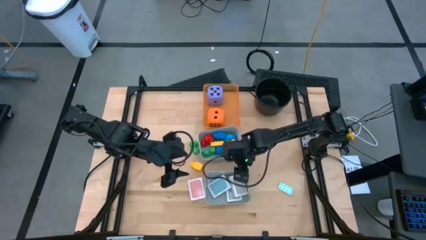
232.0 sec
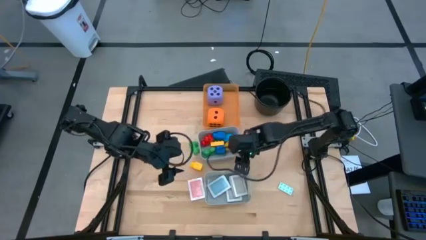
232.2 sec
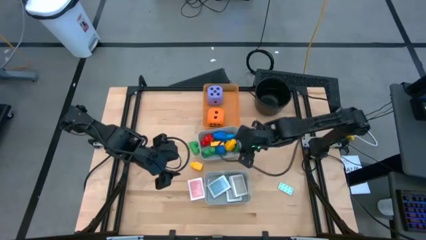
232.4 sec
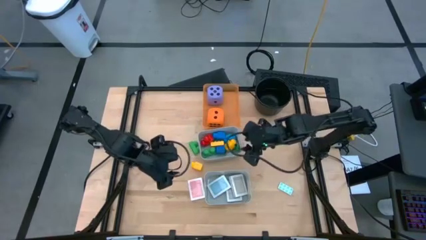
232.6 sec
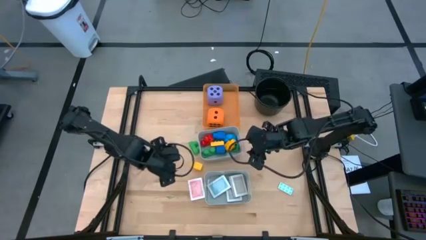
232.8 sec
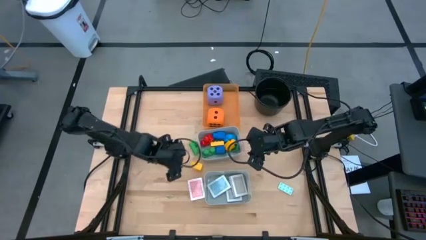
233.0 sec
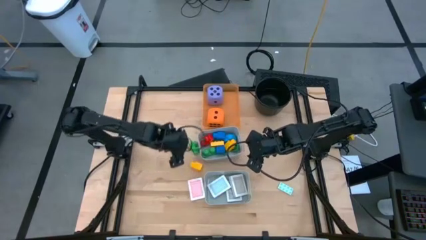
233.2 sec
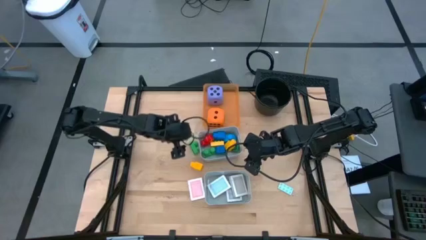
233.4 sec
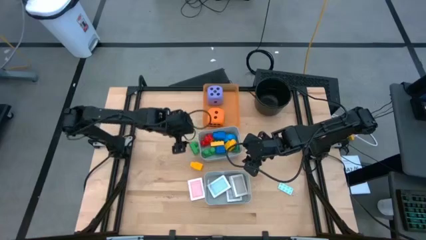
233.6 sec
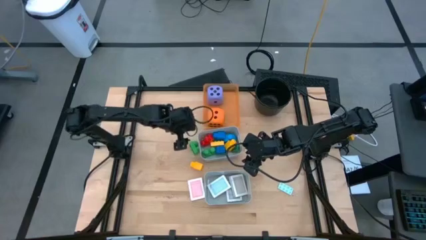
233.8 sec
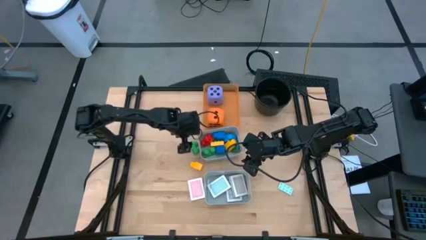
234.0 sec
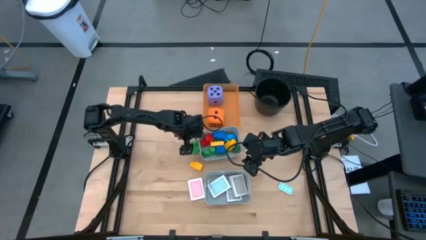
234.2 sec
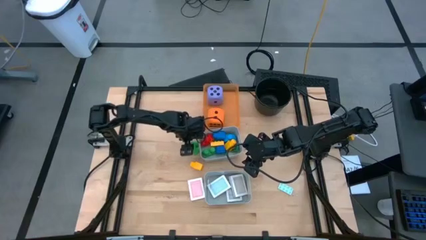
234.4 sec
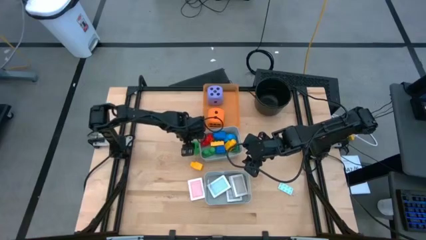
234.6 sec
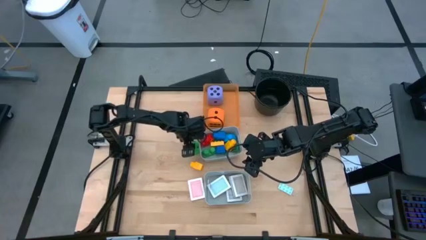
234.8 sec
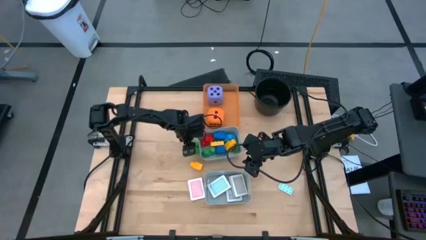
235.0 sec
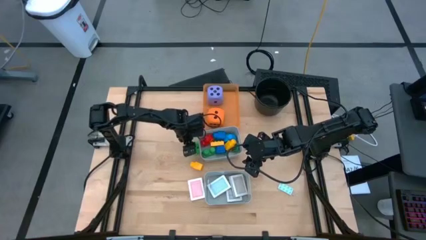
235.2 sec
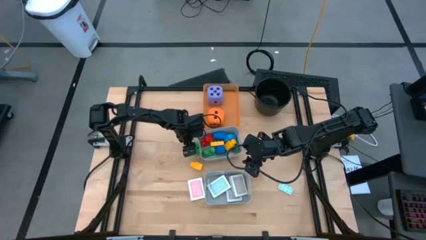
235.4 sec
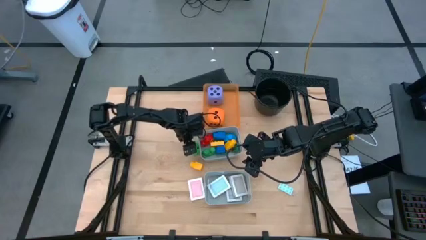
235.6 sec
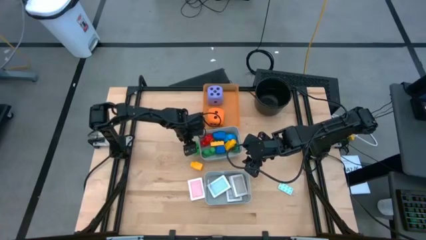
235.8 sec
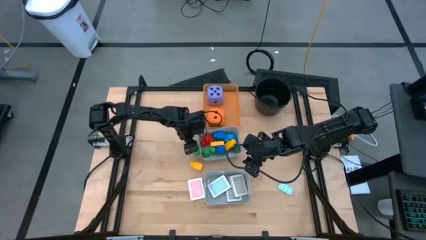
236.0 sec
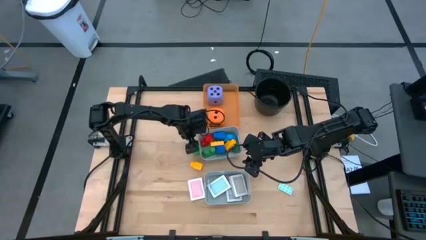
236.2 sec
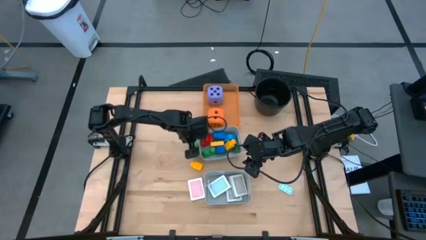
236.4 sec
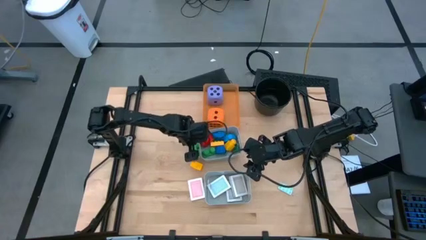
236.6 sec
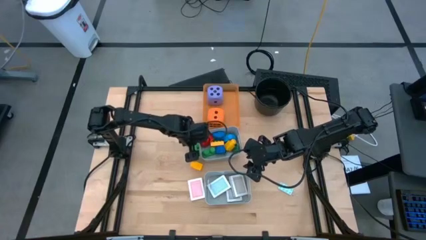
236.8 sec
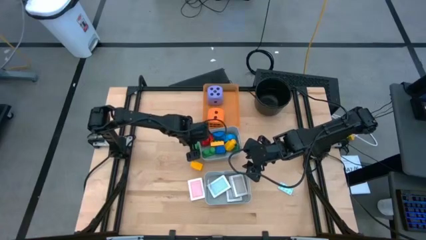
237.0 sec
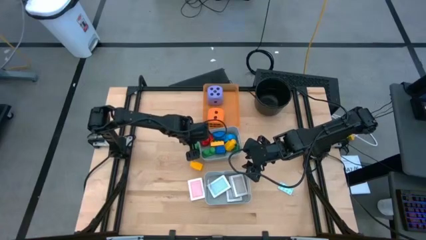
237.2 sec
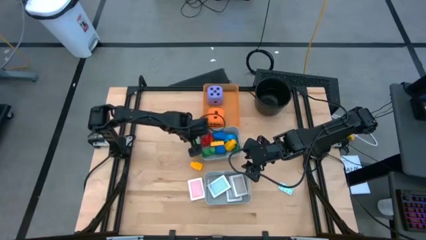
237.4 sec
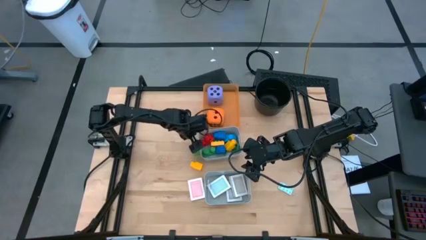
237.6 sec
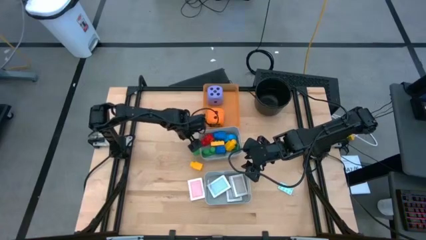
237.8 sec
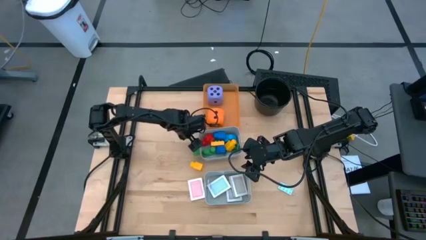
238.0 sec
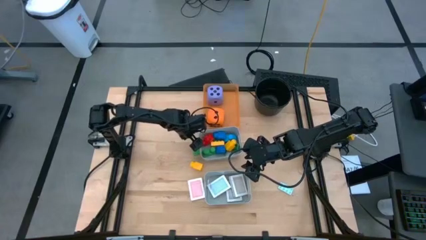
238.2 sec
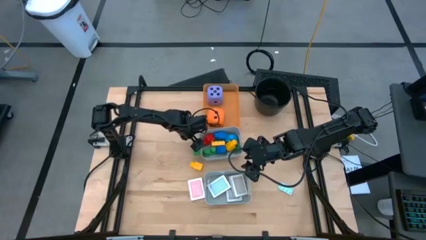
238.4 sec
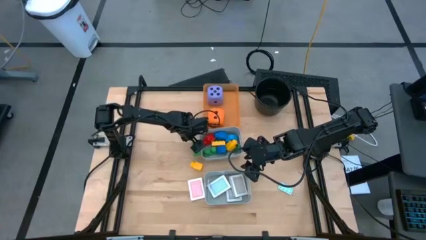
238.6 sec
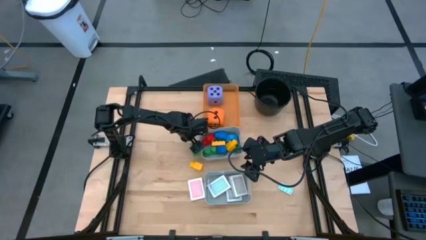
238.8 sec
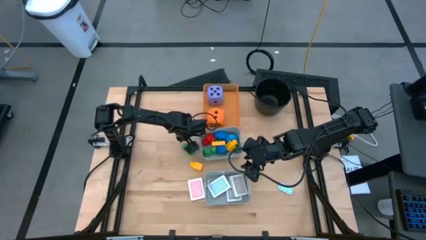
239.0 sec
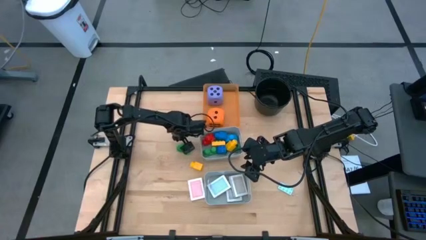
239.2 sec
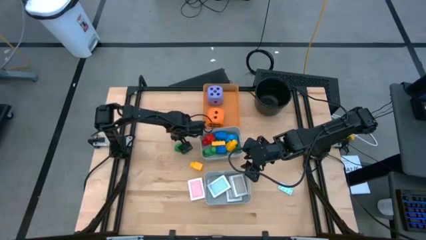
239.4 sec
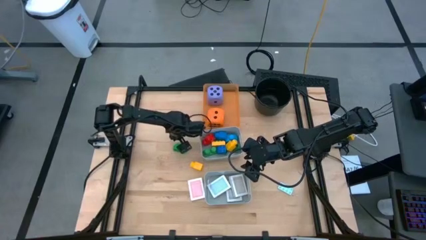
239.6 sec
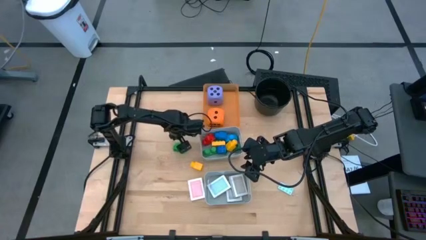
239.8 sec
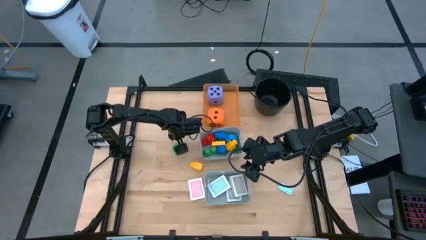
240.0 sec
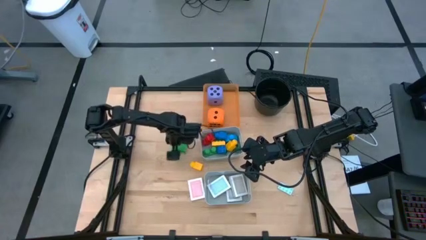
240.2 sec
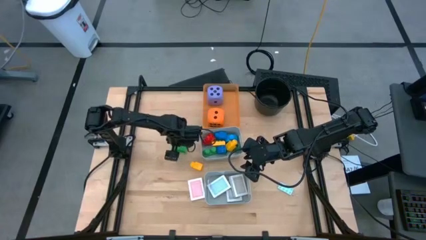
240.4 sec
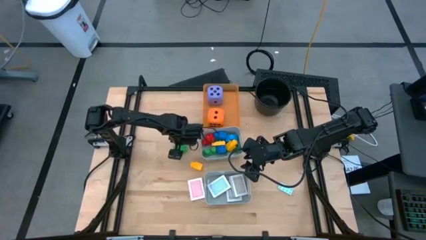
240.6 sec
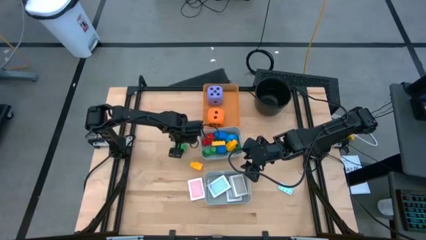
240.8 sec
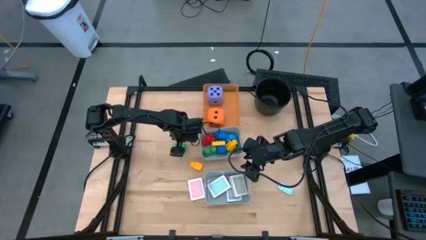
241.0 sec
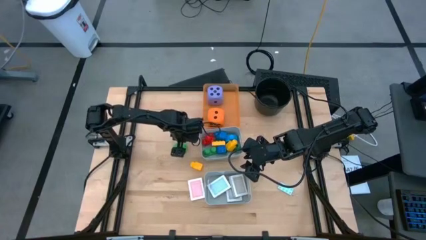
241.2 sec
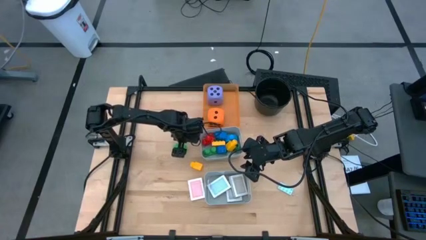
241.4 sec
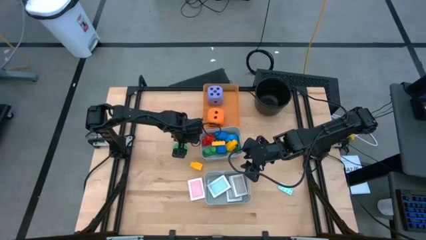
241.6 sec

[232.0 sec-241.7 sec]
Task: Pick & Place Toys
Put the green game piece into the top gray bin

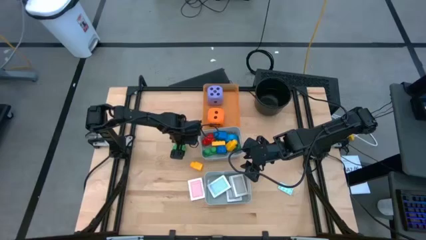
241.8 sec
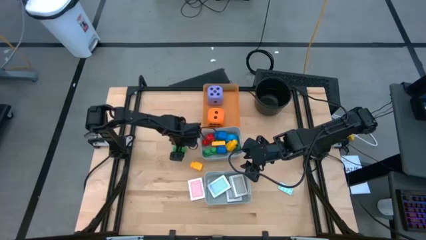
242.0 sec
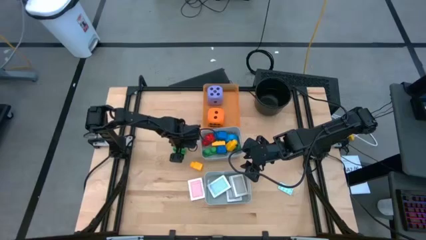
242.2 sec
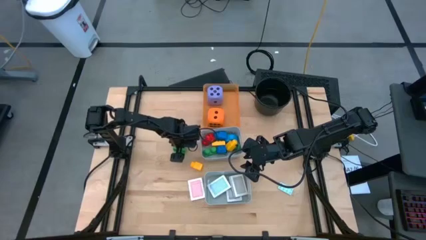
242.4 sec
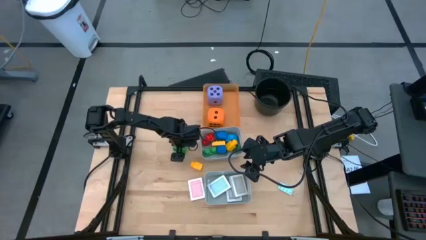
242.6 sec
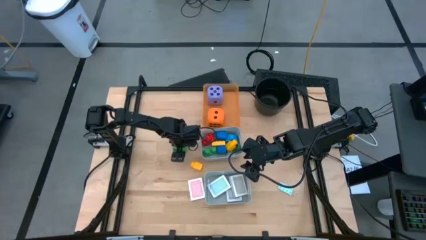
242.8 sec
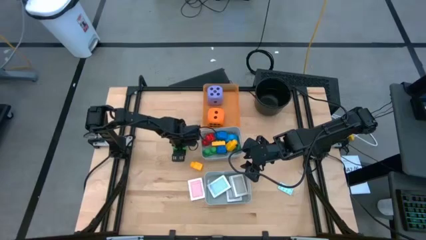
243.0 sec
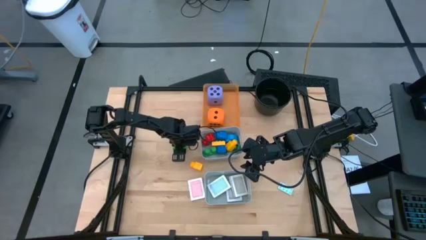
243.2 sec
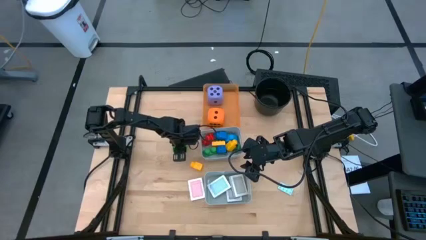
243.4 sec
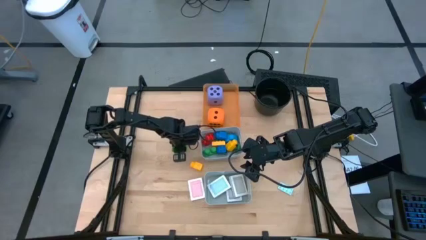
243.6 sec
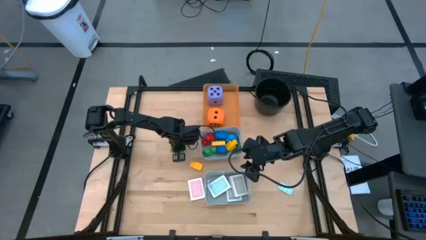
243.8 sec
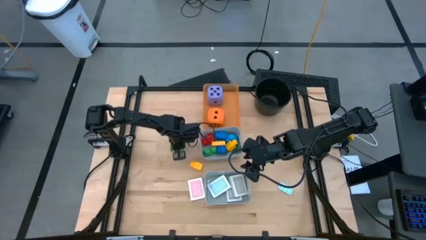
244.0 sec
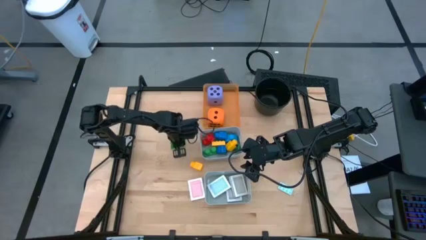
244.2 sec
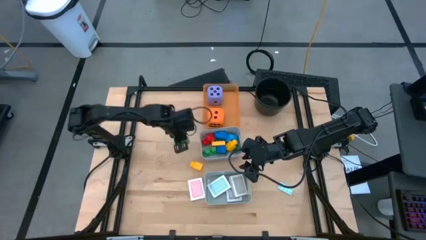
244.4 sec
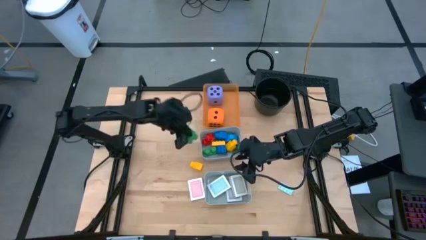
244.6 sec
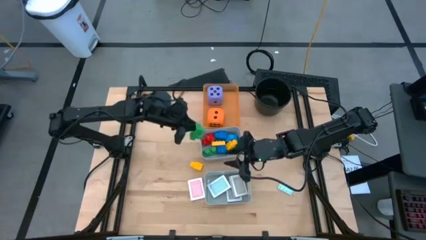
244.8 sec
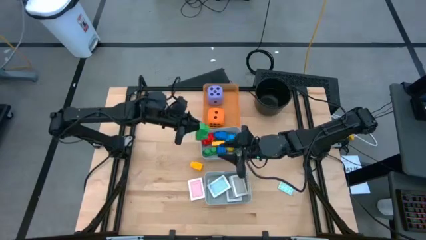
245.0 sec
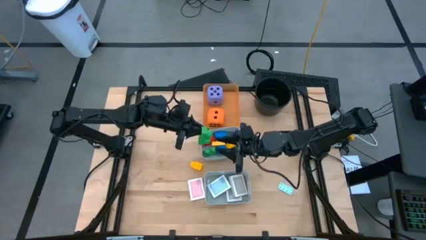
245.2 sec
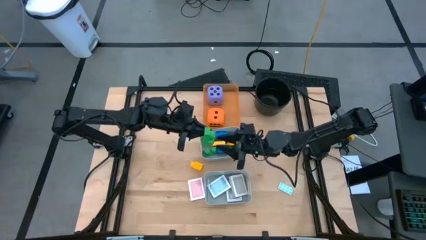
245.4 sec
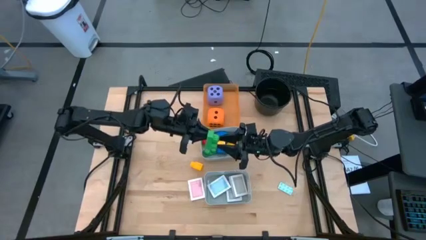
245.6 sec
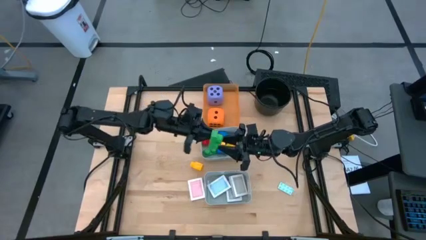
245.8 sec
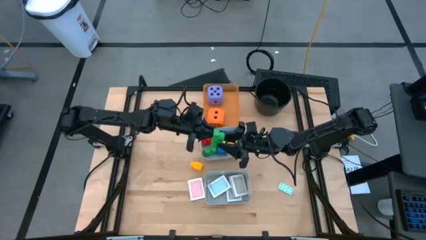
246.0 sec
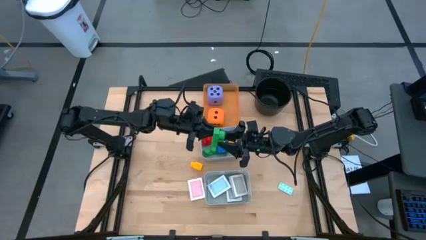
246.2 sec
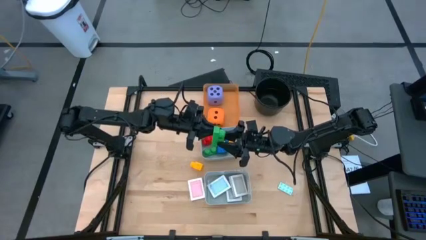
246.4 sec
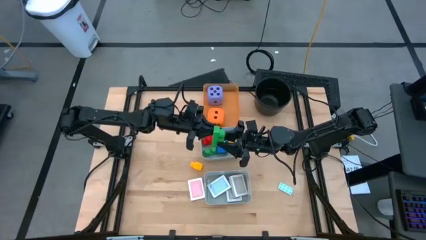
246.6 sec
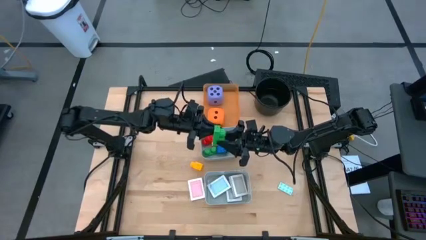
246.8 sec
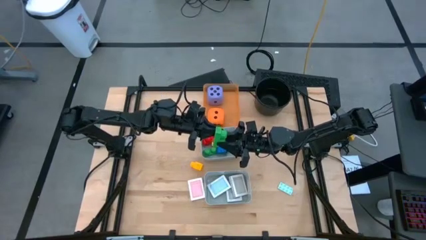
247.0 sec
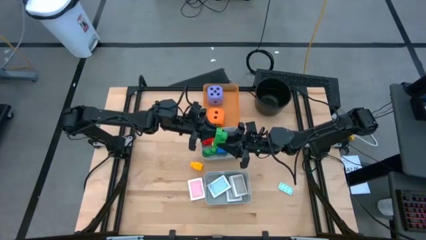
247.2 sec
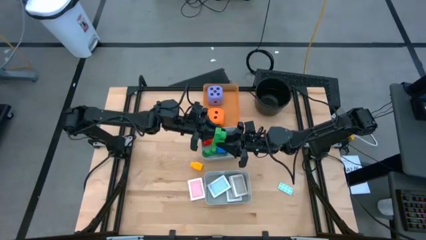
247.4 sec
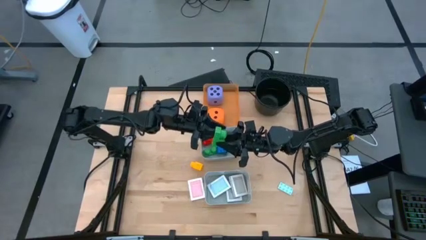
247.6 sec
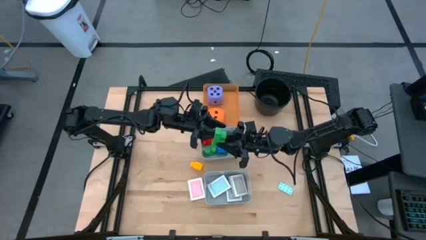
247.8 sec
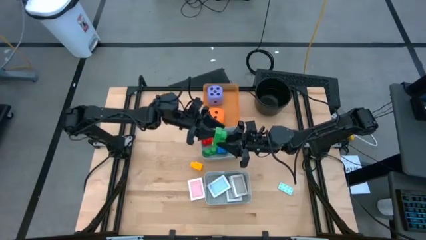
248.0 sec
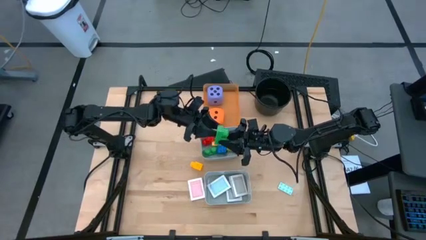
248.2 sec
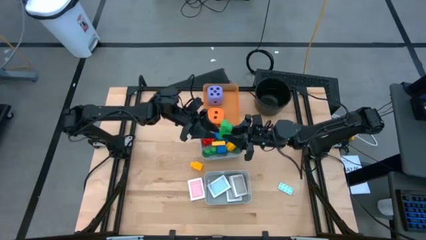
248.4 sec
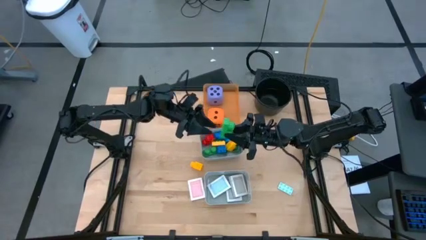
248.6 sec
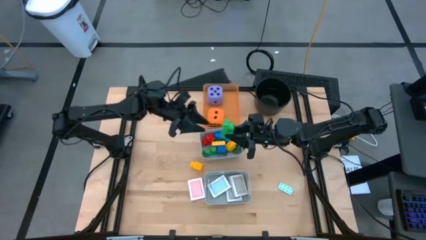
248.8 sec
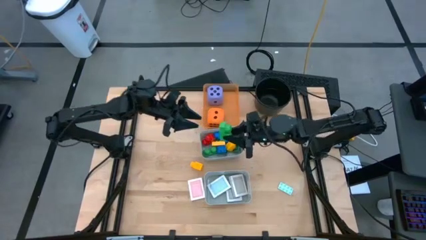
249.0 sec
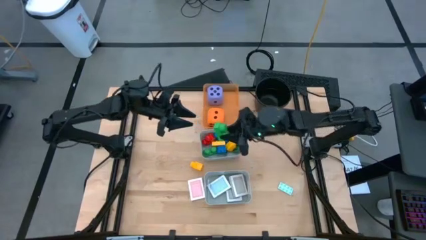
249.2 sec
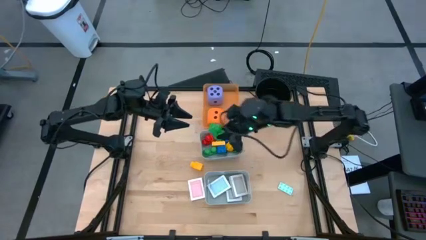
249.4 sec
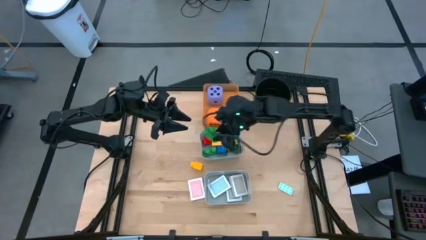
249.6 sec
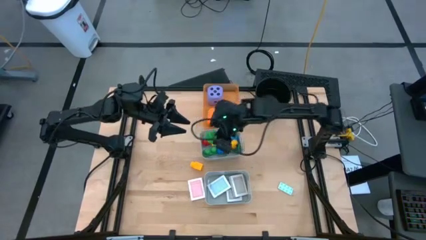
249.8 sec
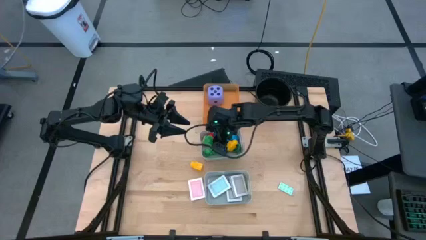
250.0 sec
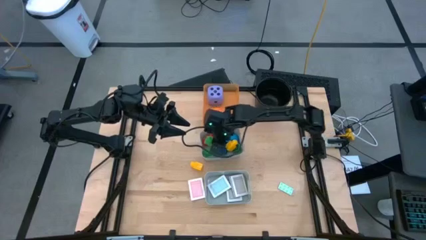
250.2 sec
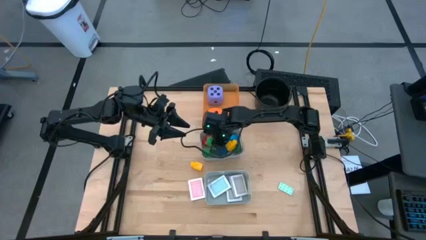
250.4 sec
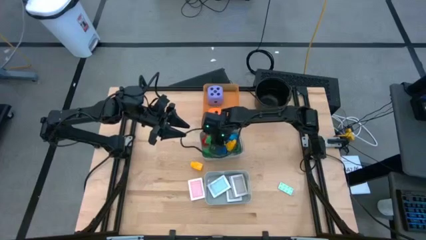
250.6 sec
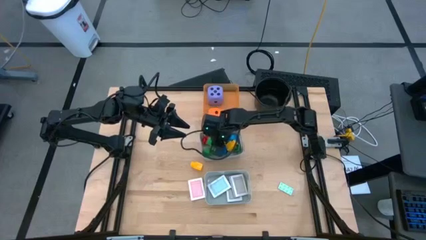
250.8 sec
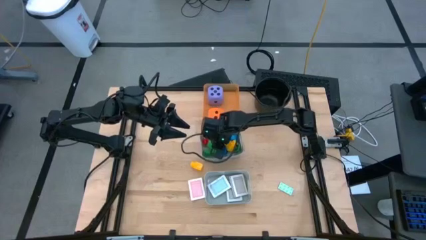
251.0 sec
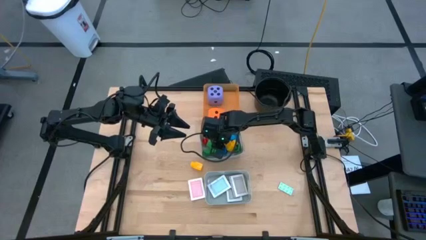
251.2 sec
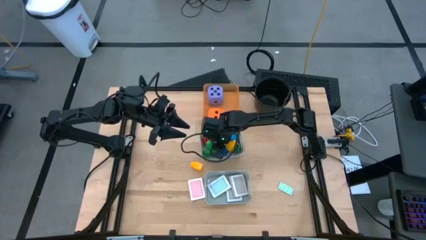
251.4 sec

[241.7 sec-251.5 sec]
Put the green game piece into the top gray bin
